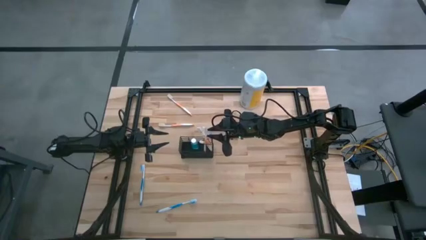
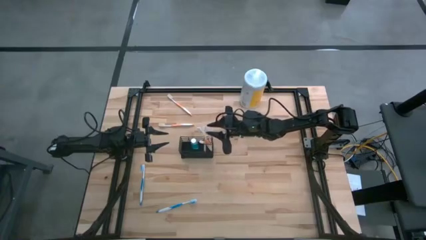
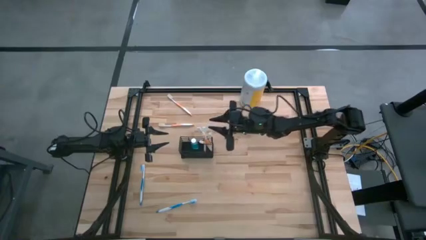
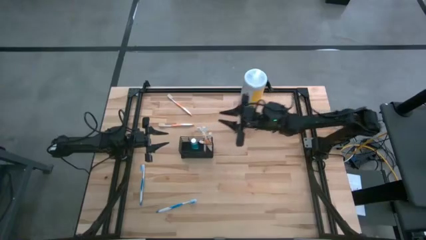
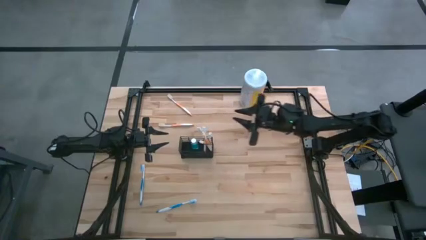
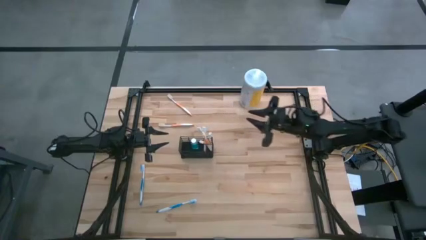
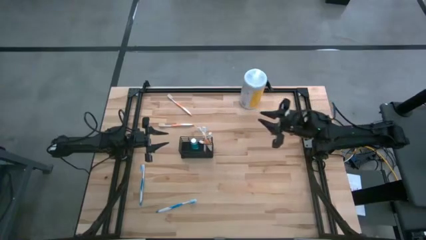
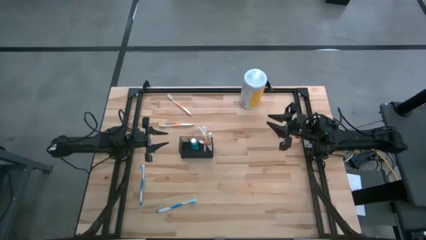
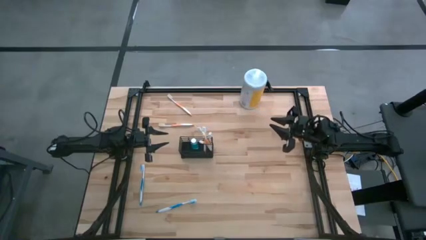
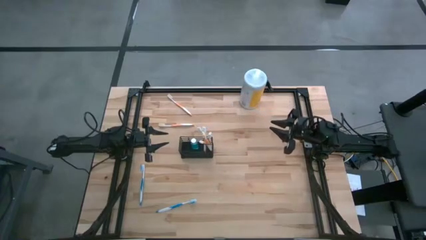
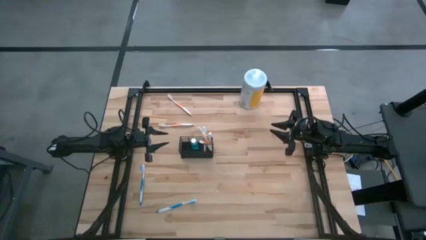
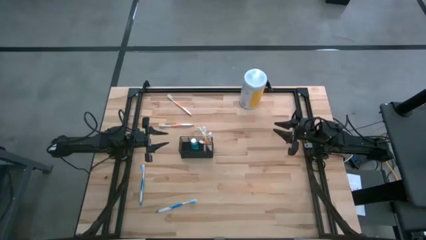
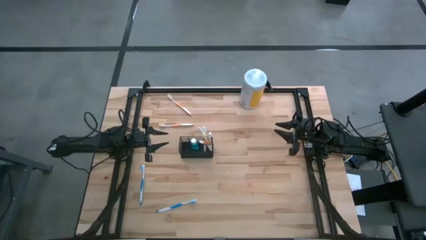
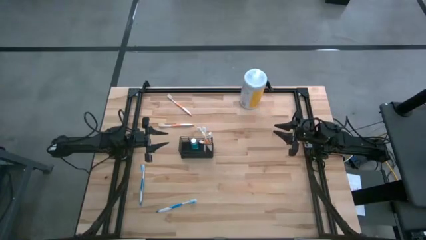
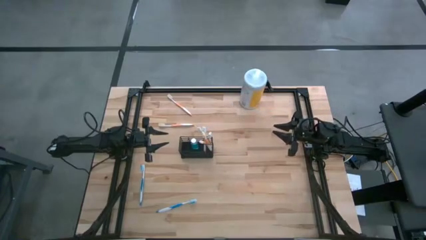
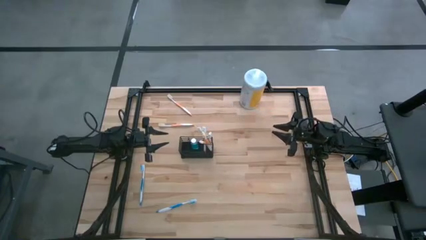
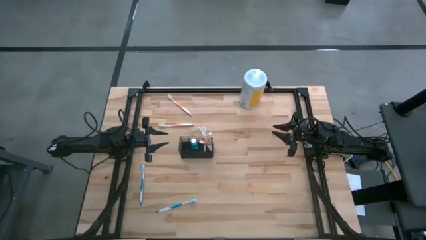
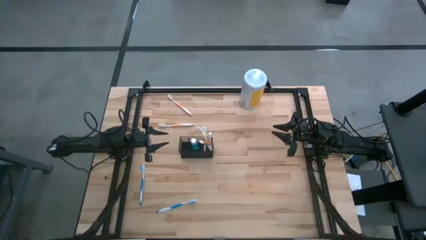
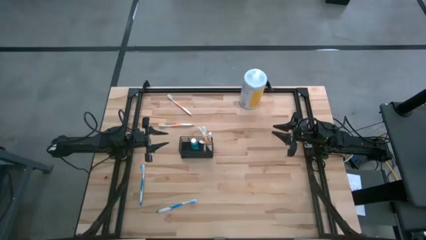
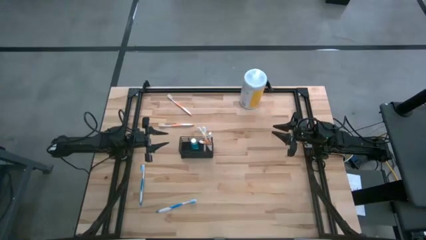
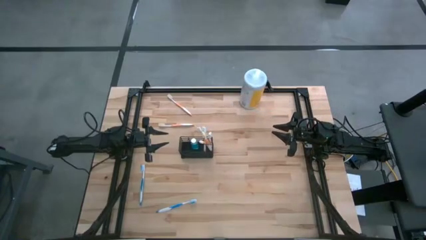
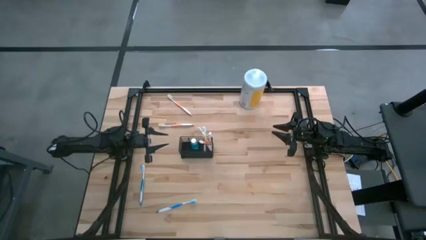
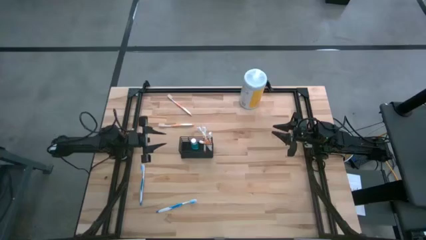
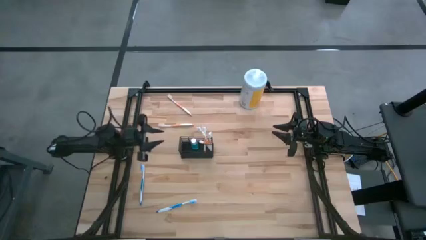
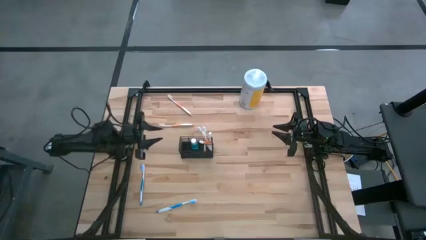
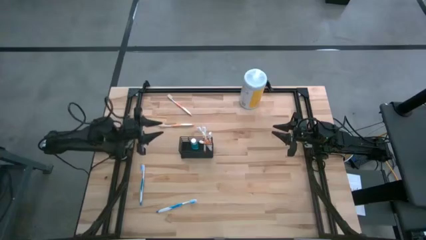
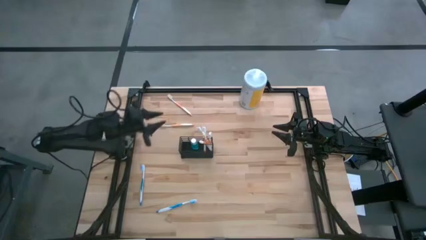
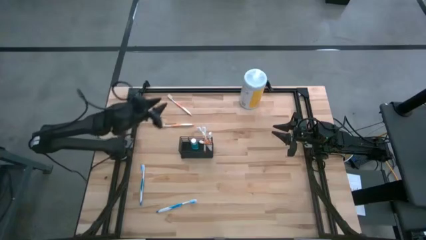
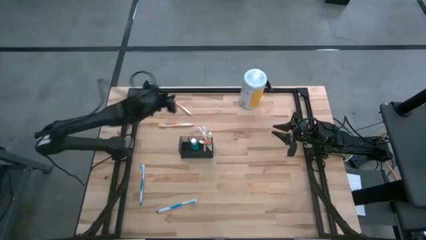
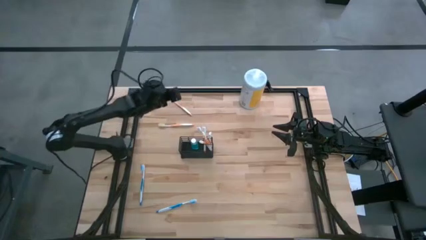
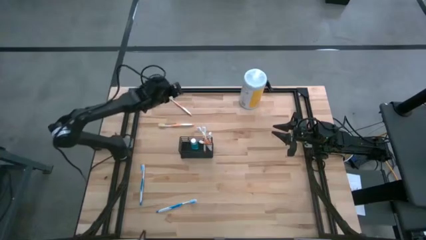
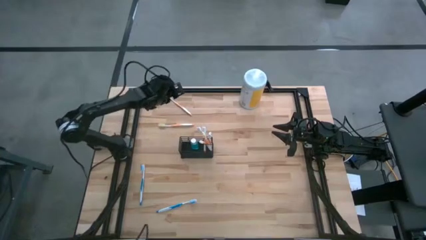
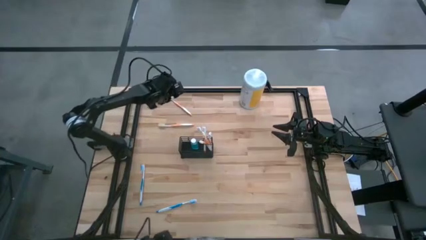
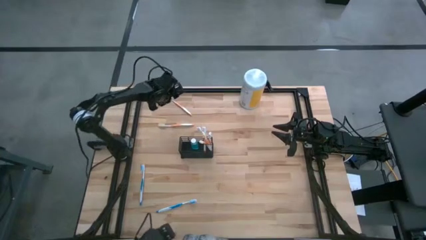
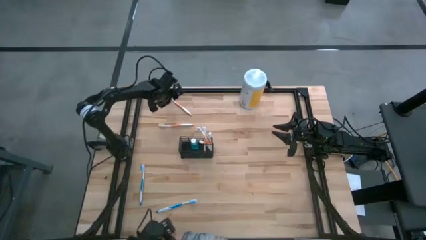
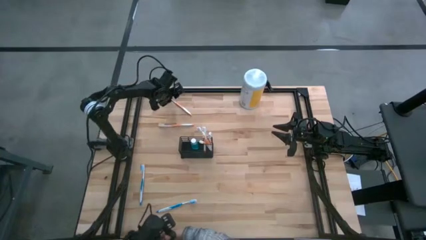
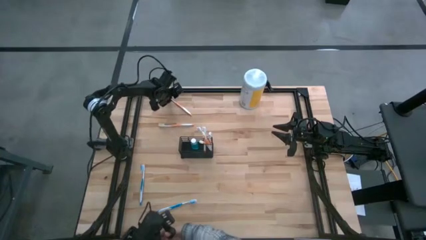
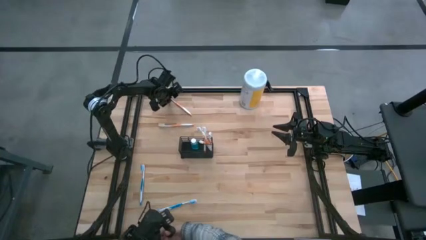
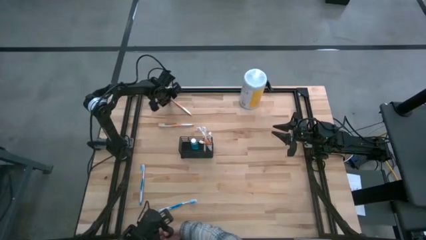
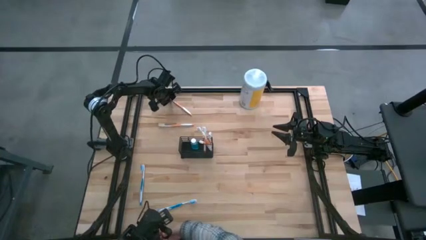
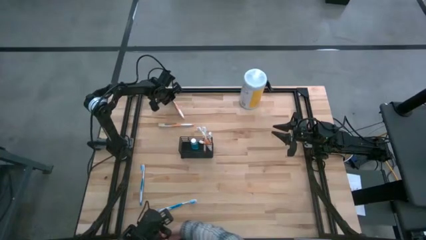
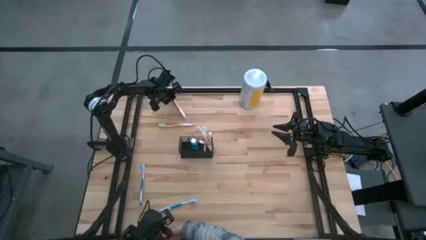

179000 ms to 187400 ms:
Task: Pick & Place toothbrushing station
Put the orange toothbrush into the right section of the wire organizer

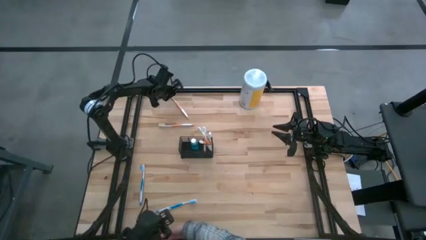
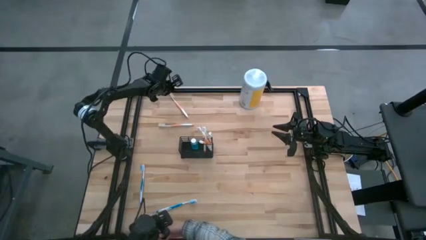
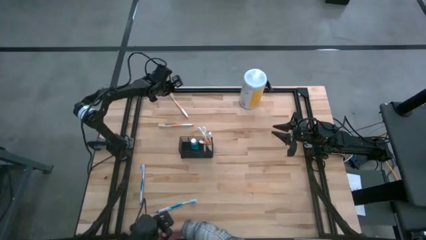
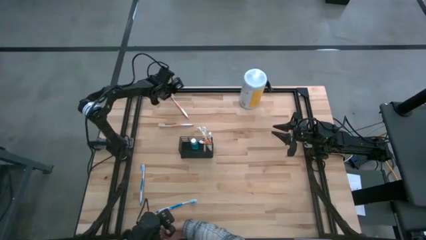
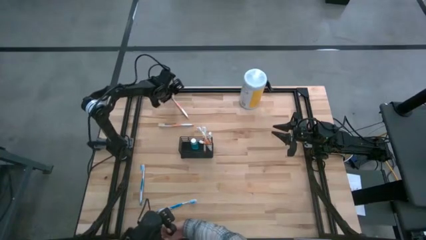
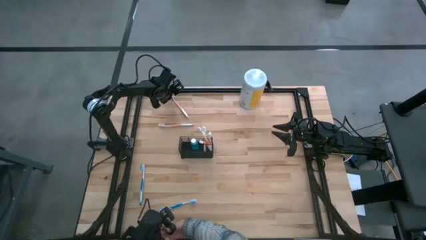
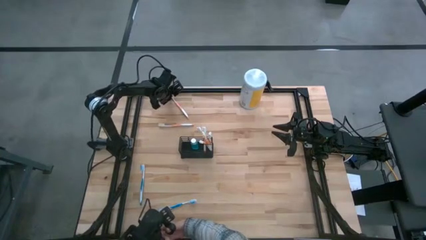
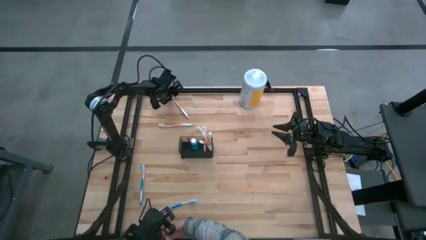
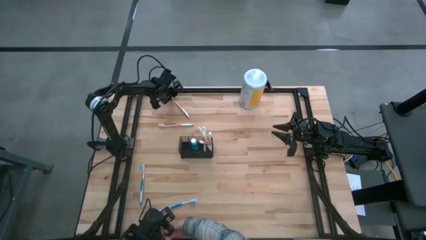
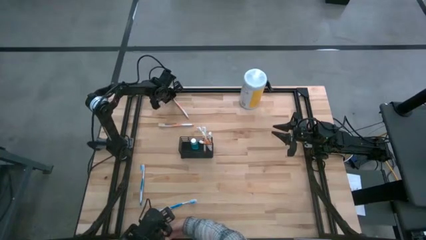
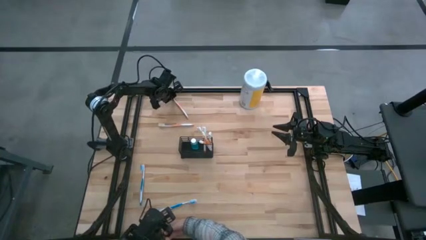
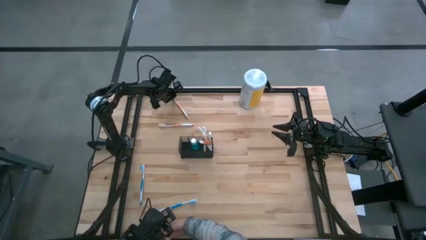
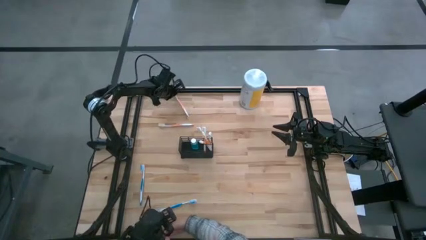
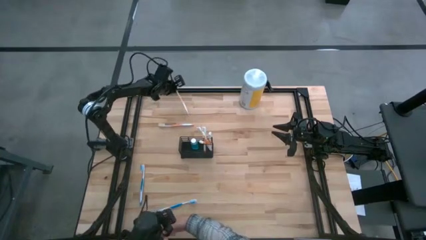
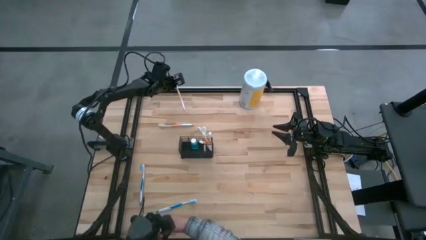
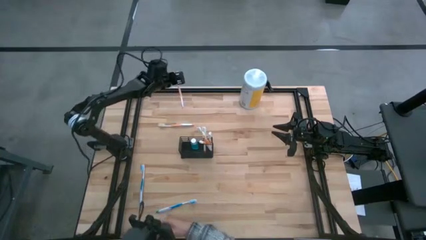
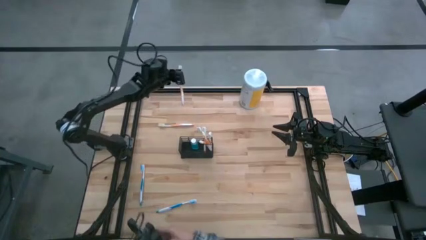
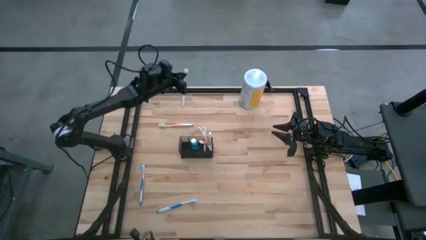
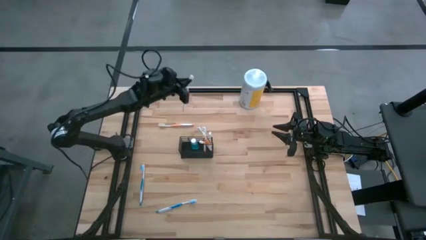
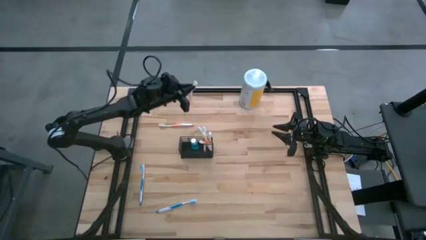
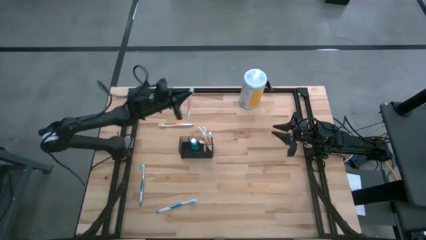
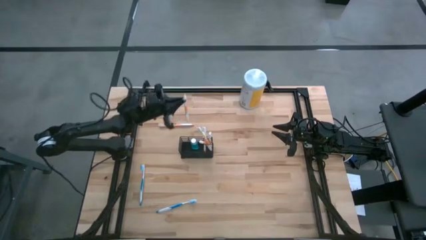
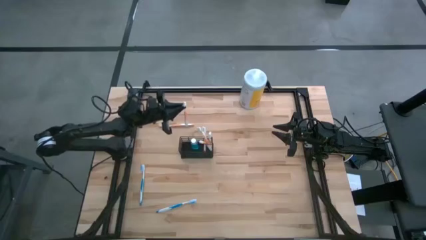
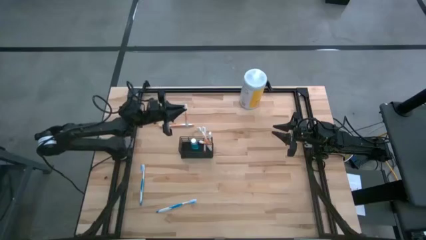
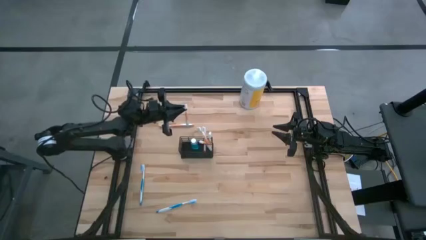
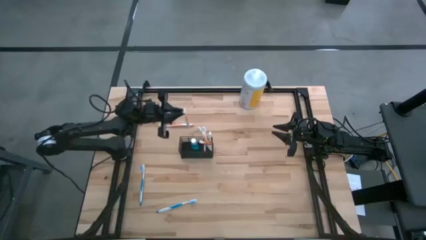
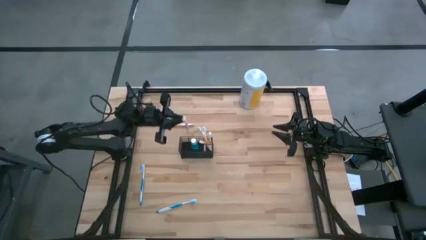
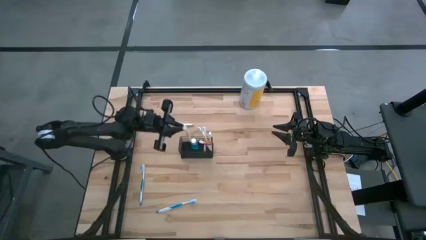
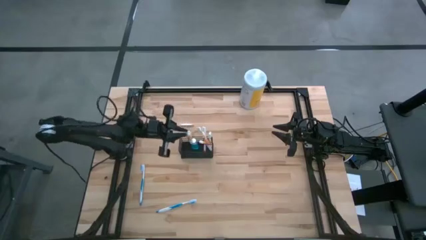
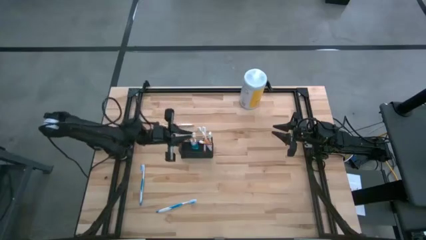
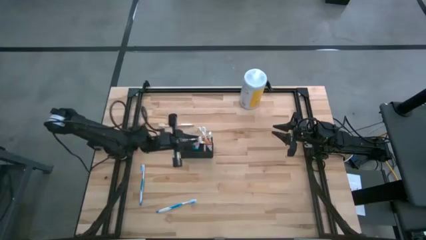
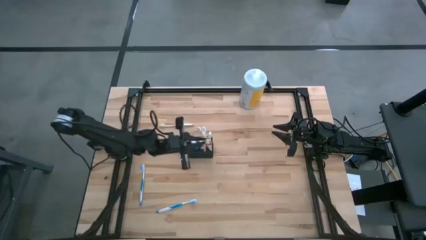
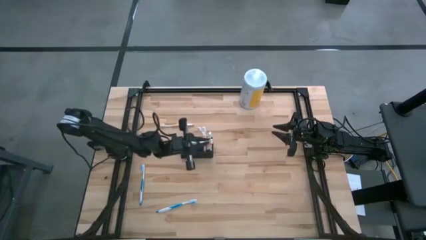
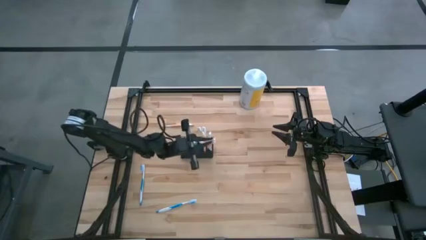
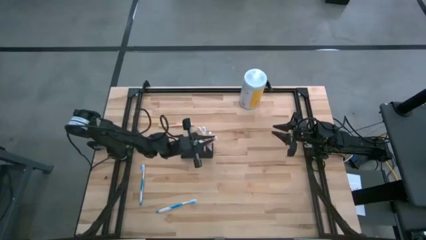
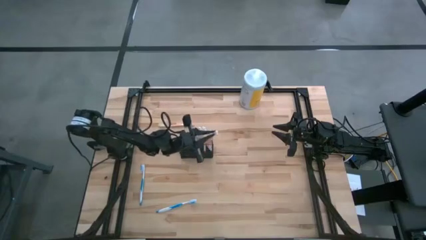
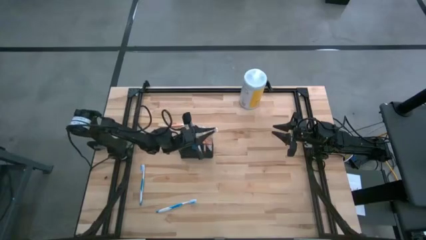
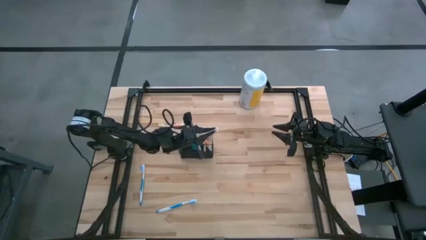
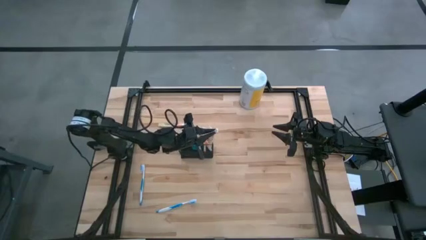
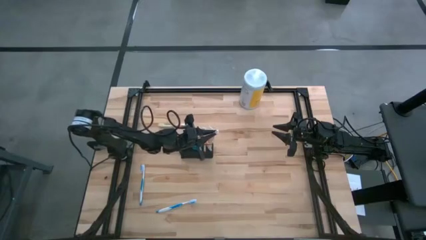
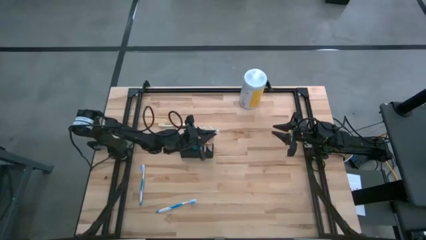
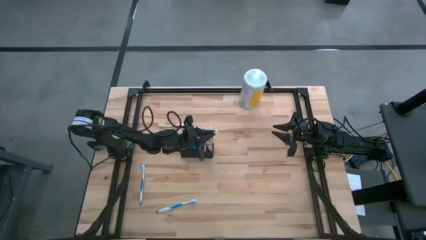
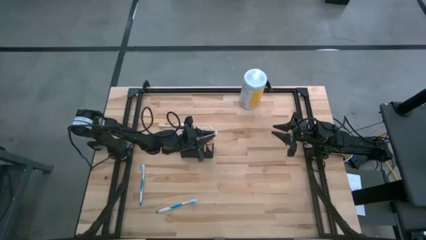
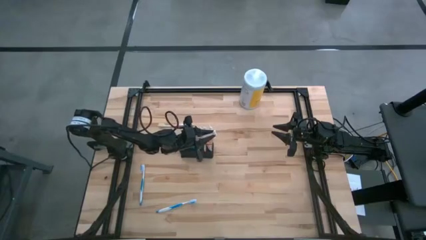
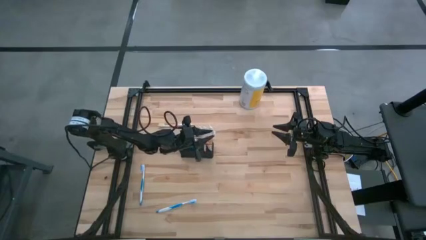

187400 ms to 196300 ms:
Put the orange toothbrush into the right section of the wire organizer
